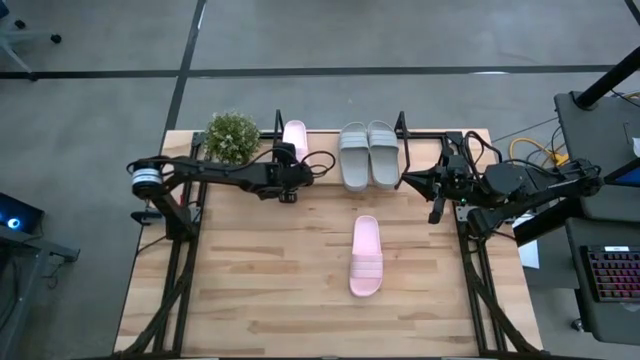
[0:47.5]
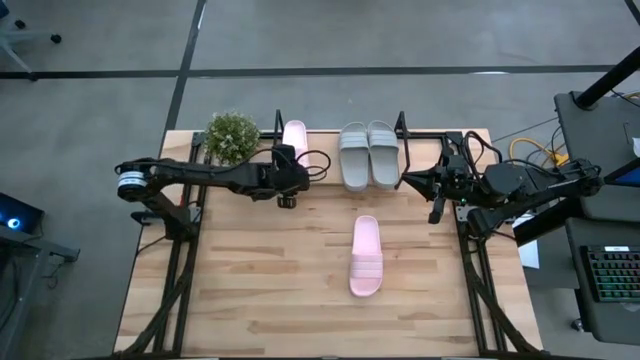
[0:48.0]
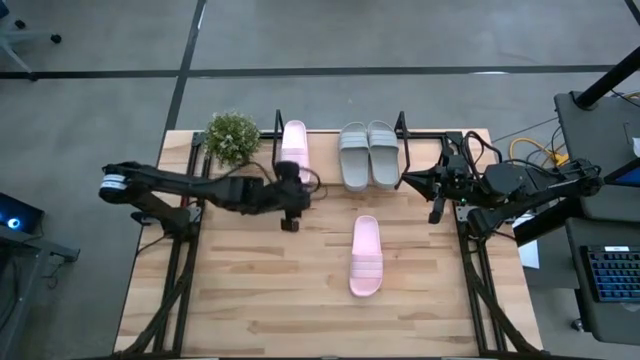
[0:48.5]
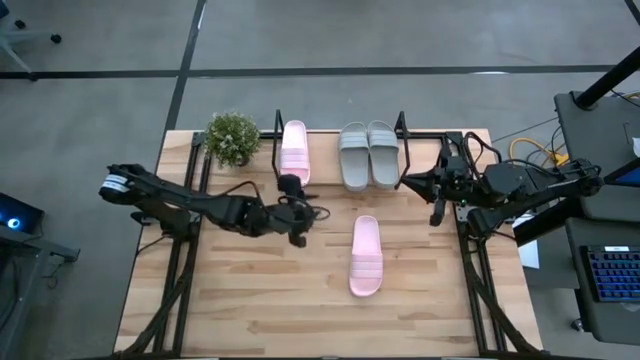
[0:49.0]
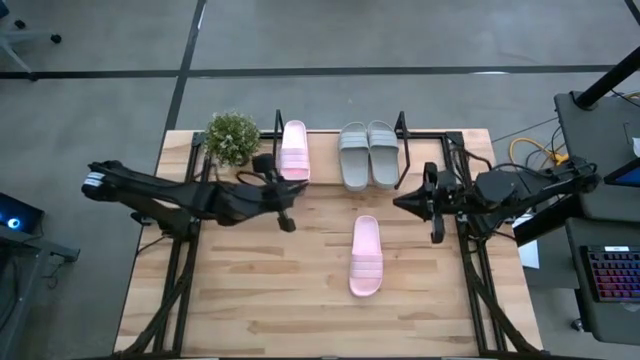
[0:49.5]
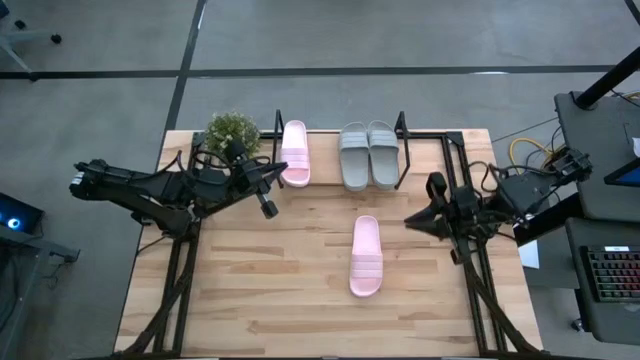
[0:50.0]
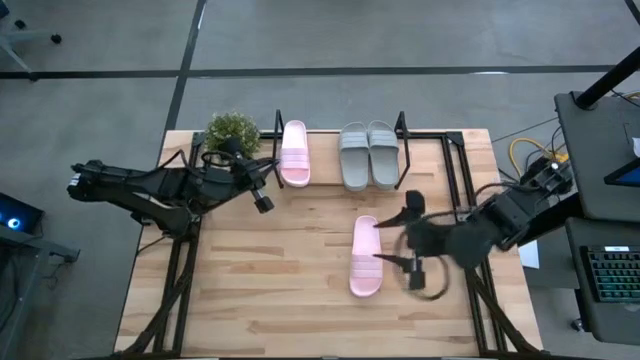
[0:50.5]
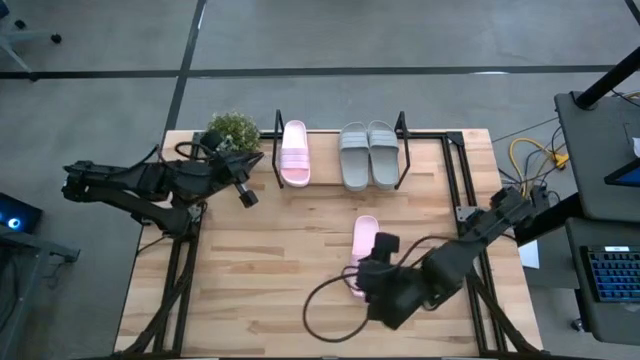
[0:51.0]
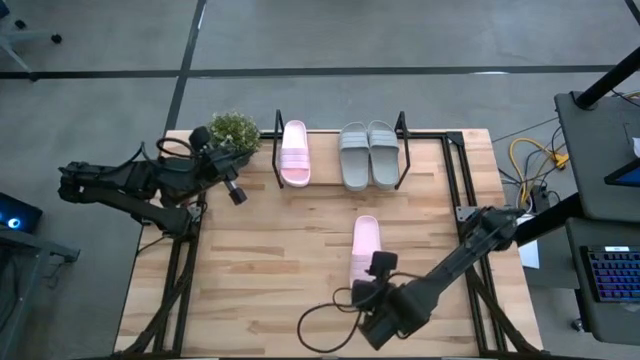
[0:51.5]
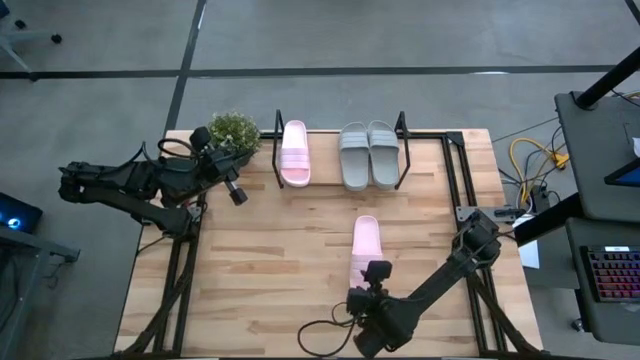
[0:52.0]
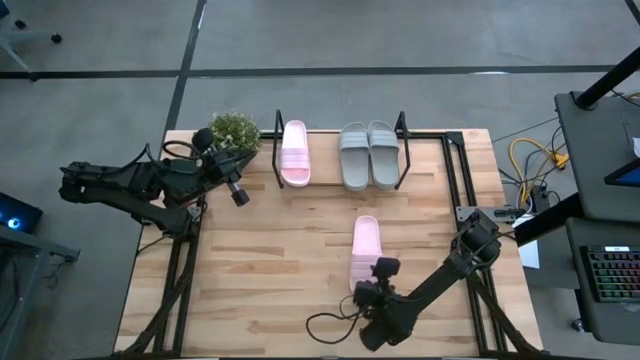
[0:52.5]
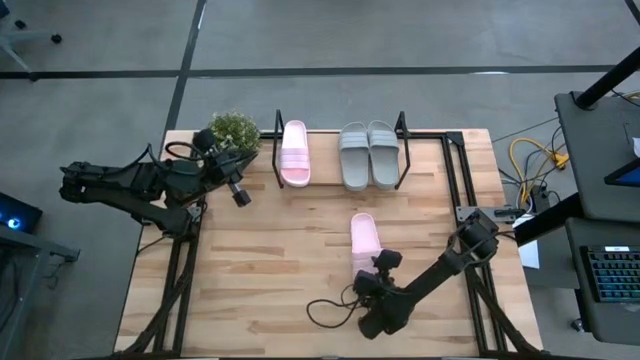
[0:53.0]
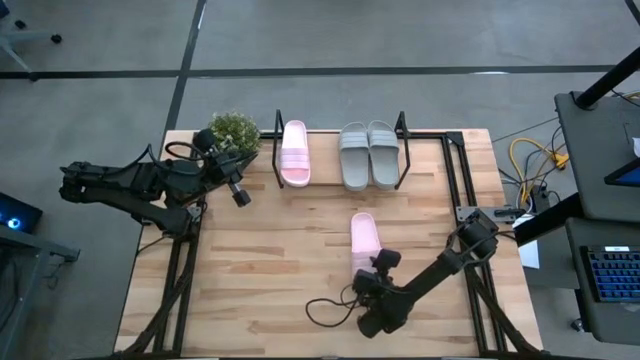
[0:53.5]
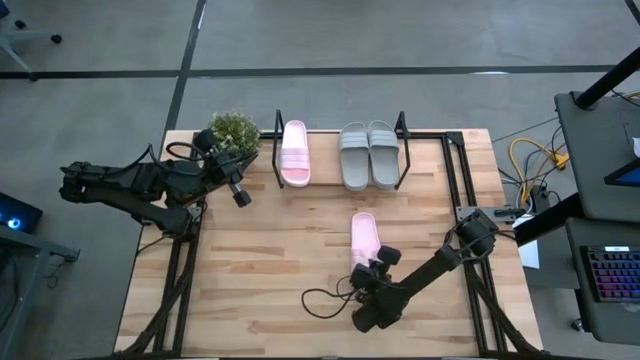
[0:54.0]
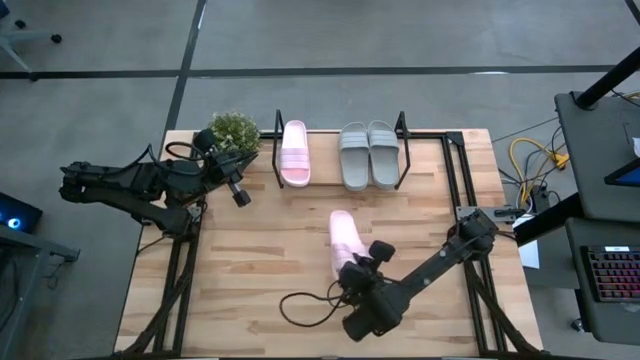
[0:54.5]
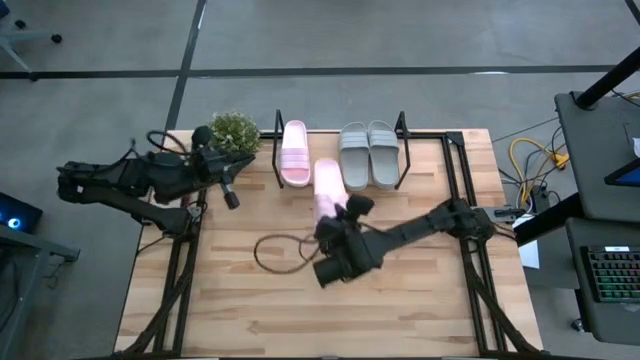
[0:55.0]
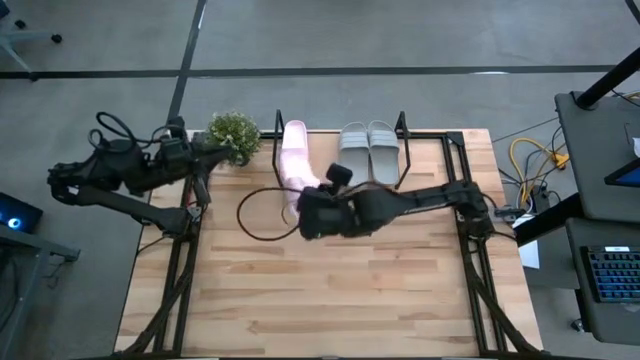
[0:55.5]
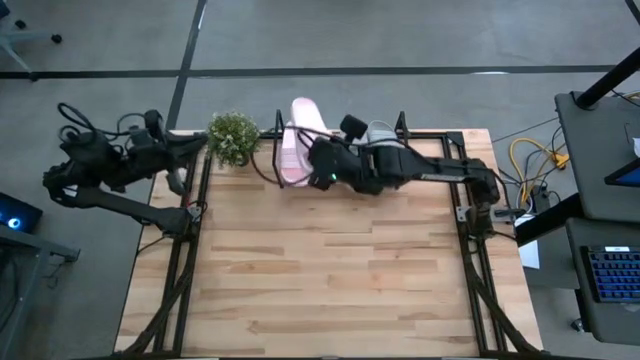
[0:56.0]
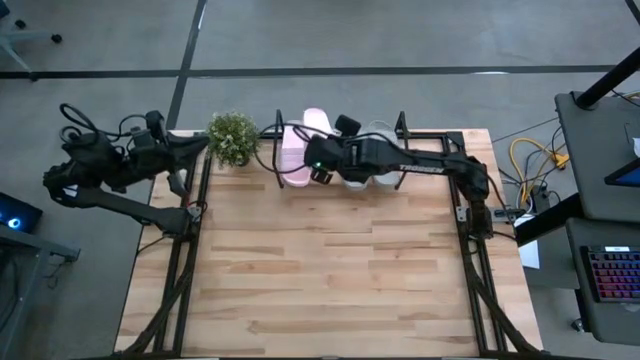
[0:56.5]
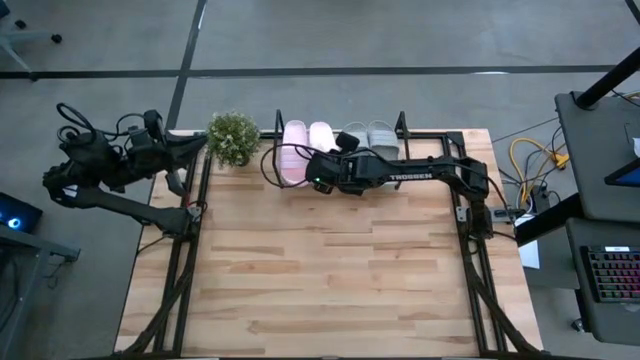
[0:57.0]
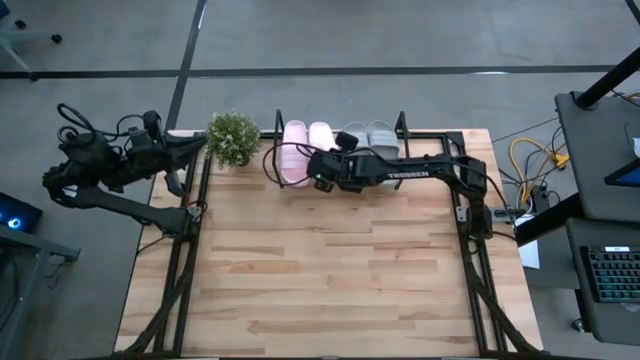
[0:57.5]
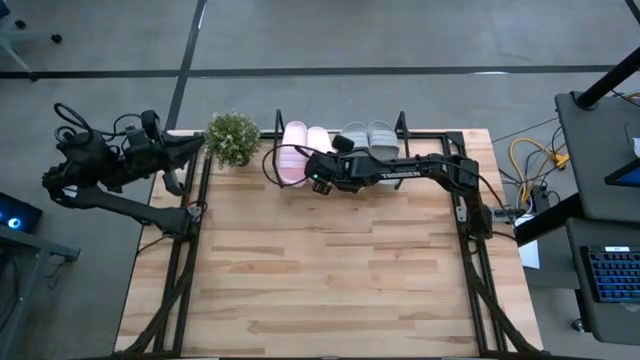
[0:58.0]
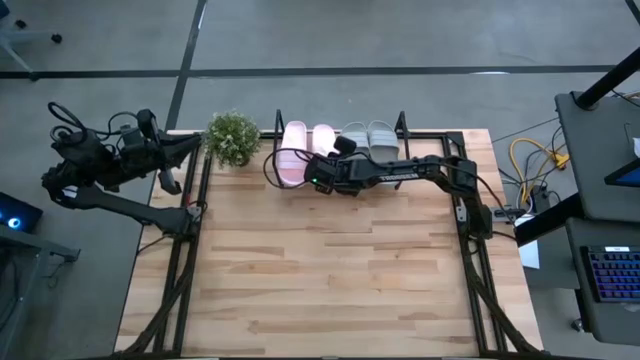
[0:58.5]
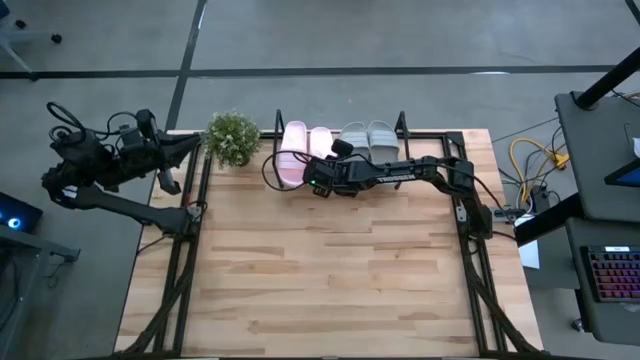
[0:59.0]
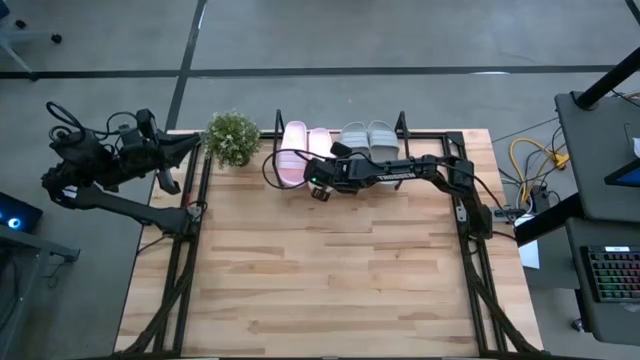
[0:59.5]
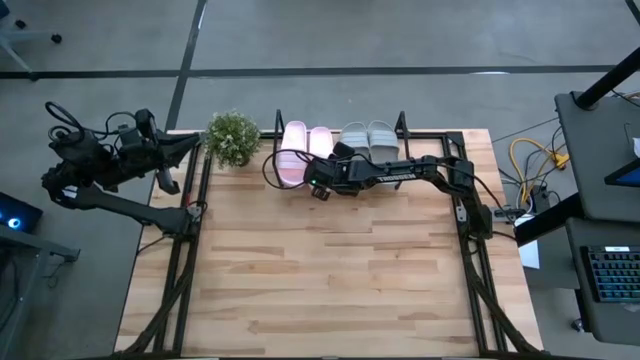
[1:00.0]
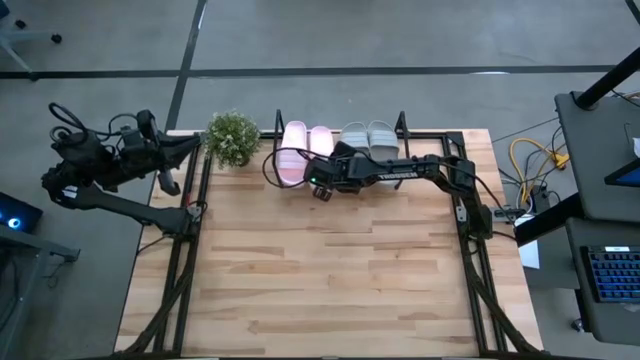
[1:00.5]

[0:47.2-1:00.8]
Task: Pick and place slides into the shelf
Put the pink slipper on the shelf

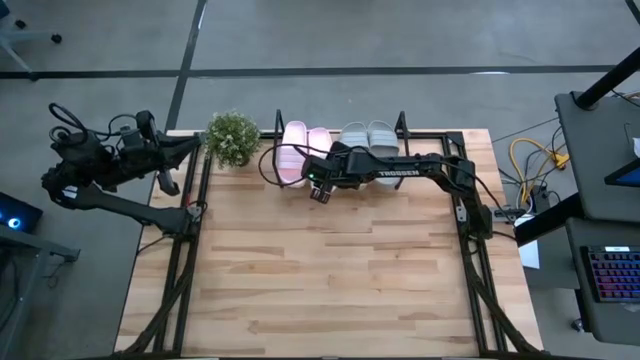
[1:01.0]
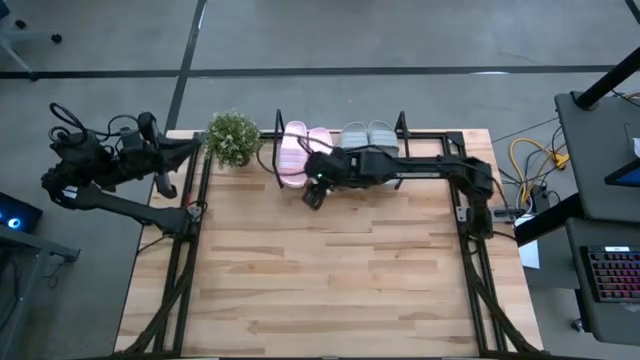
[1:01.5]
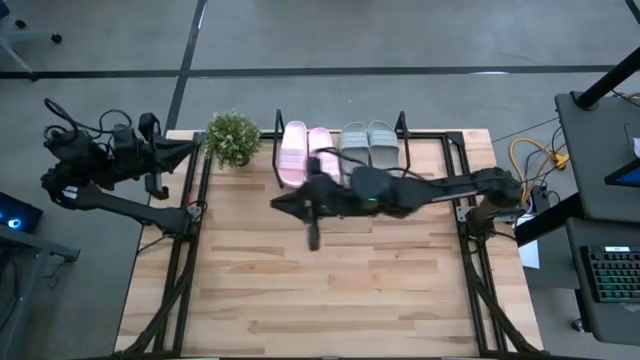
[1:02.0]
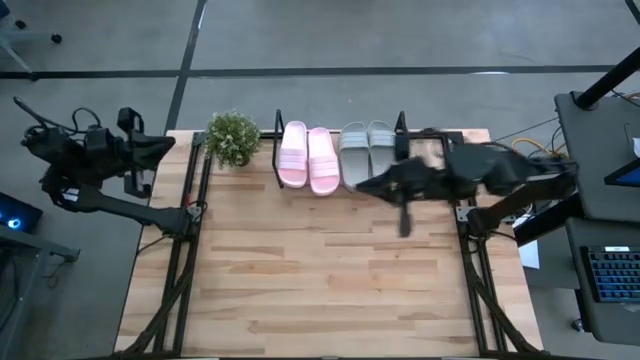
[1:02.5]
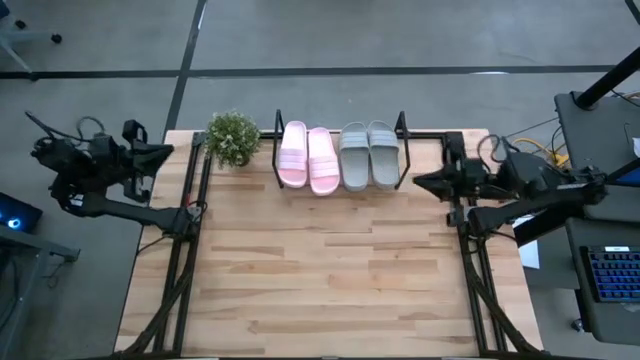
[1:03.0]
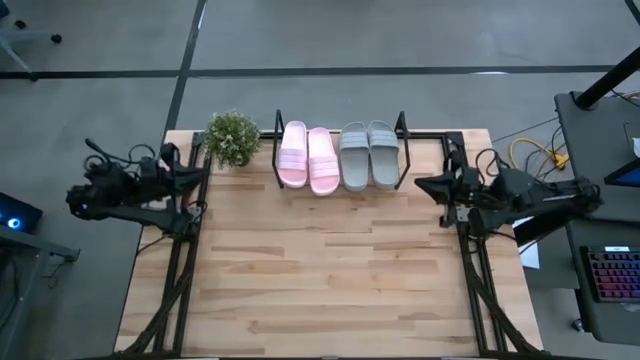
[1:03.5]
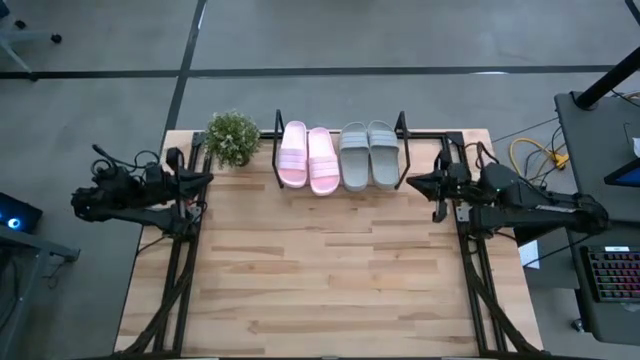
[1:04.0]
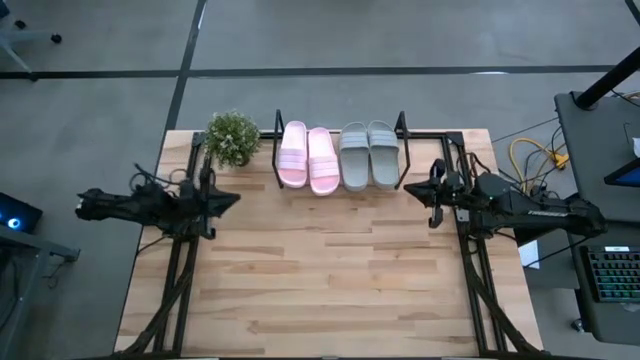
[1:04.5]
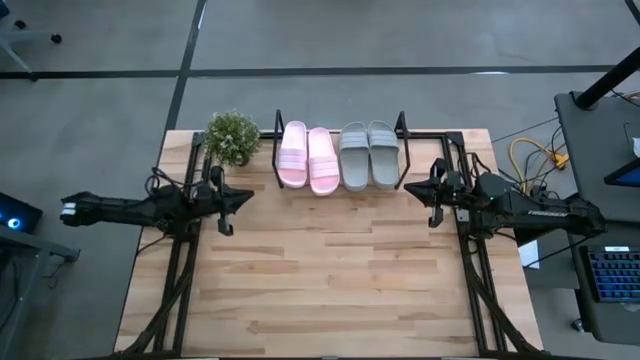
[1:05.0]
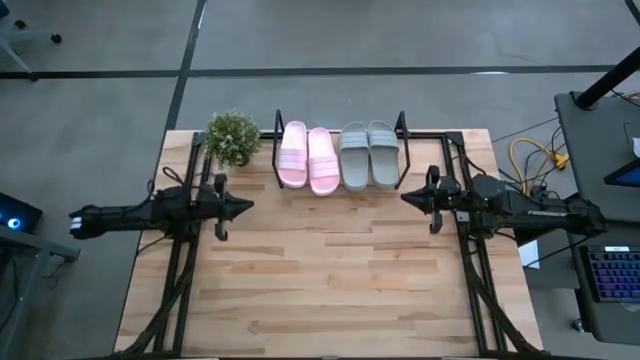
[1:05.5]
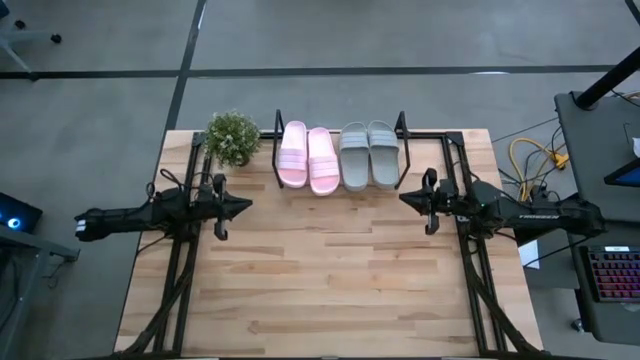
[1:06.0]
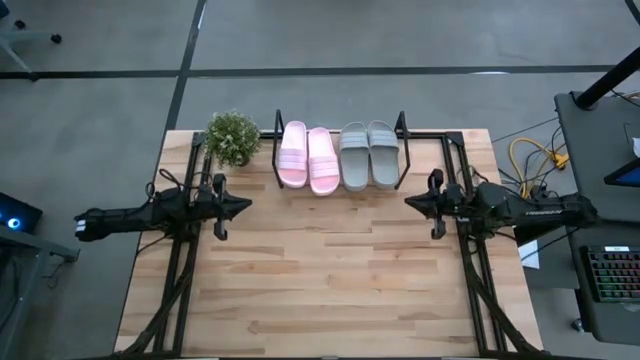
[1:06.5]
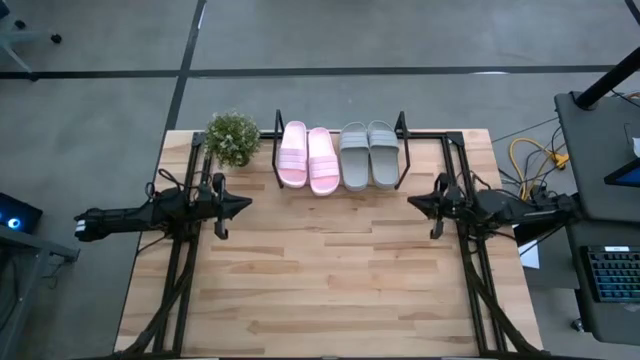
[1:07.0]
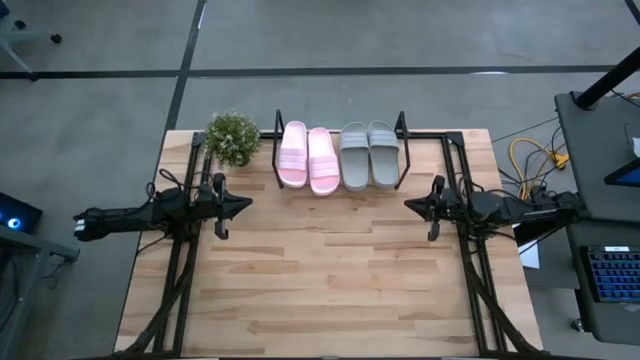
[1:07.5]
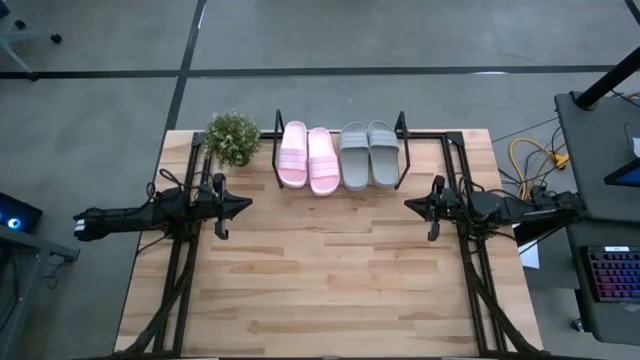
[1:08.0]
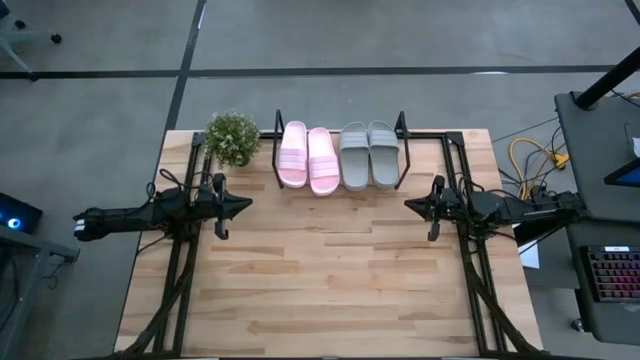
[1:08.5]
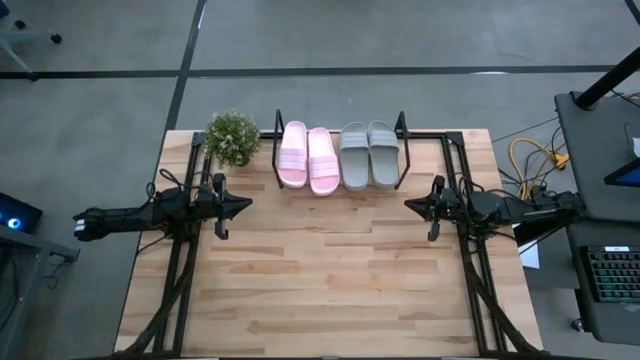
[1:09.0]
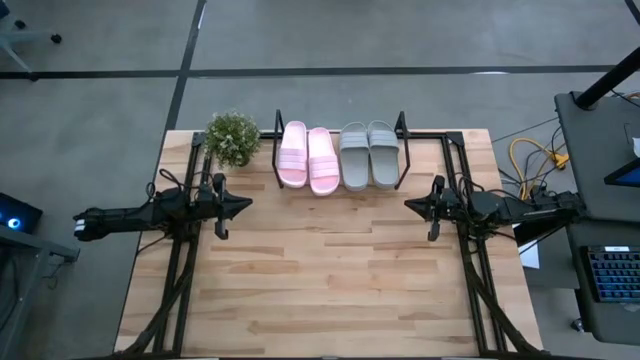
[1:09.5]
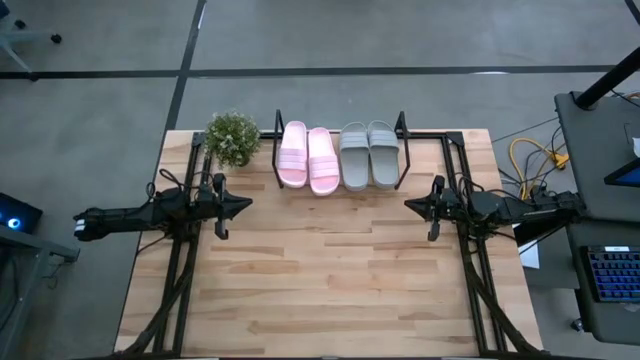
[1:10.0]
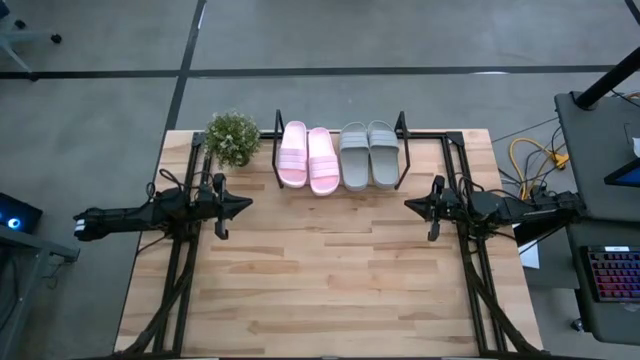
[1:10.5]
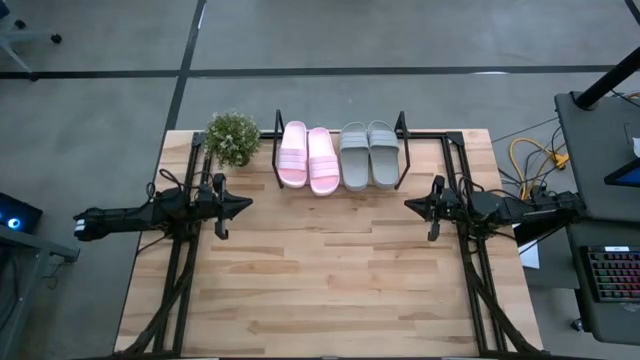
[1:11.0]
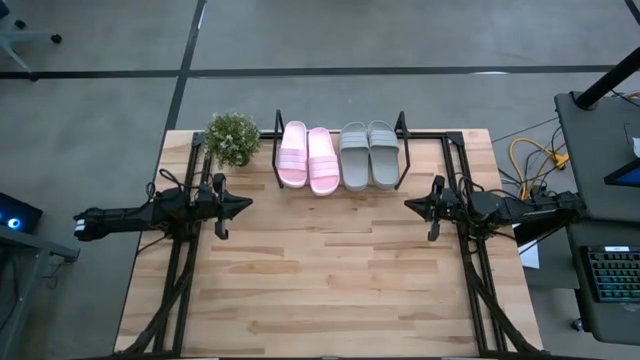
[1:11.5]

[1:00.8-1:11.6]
Return To Home Position
